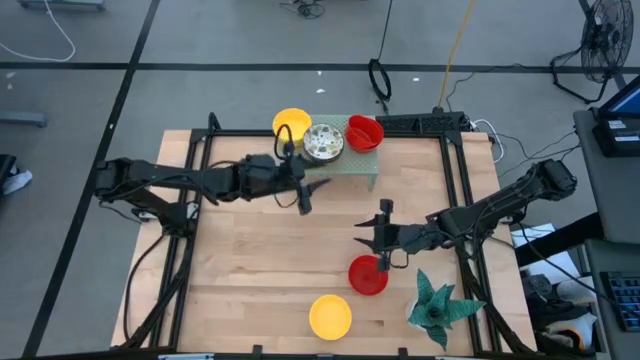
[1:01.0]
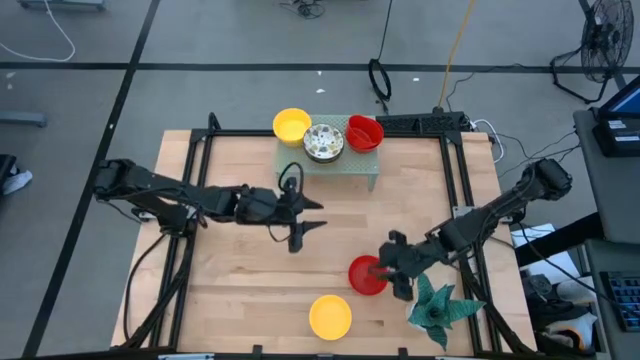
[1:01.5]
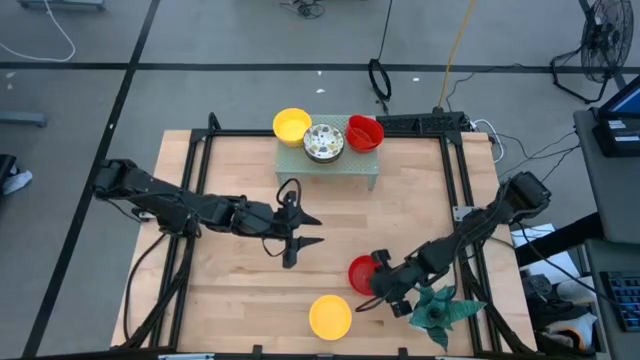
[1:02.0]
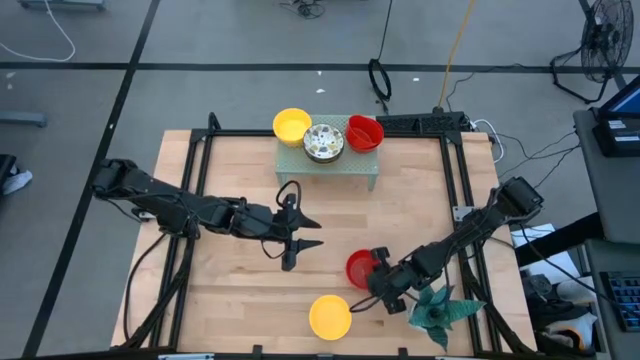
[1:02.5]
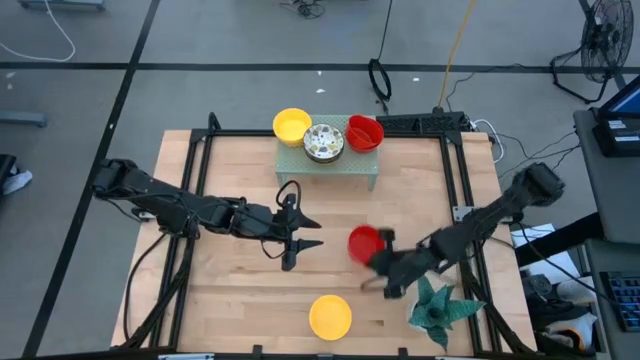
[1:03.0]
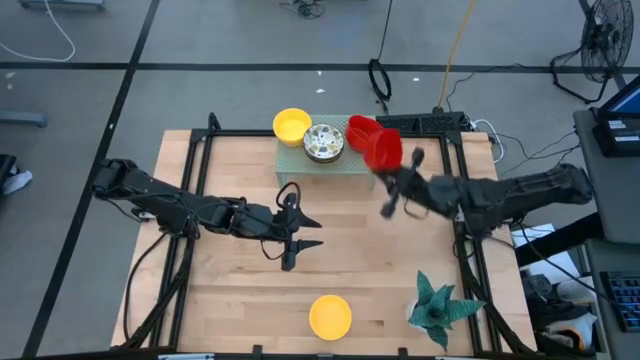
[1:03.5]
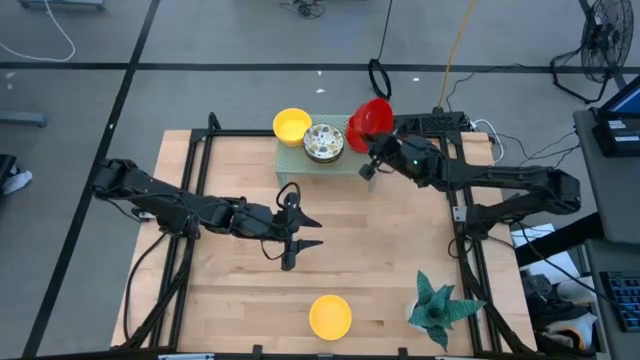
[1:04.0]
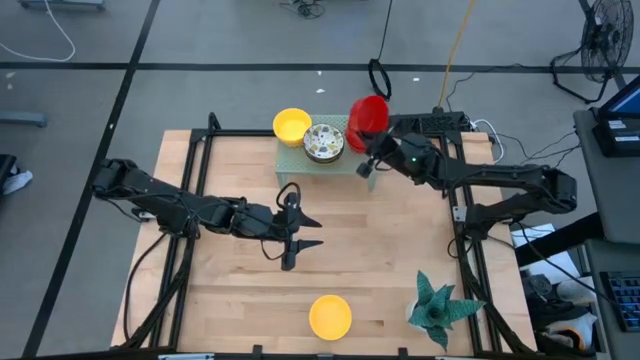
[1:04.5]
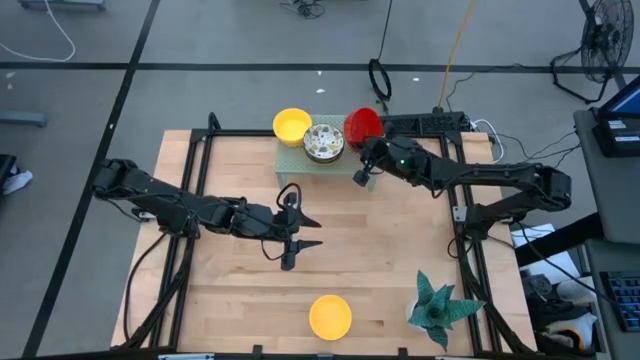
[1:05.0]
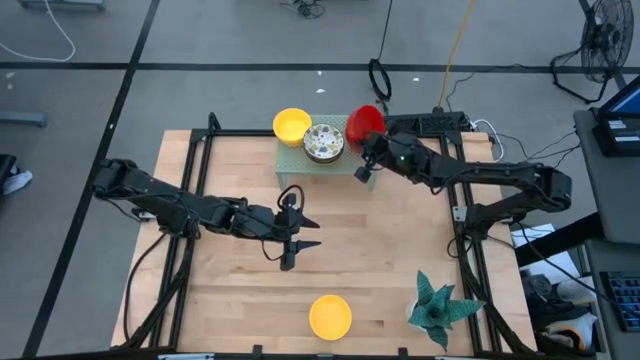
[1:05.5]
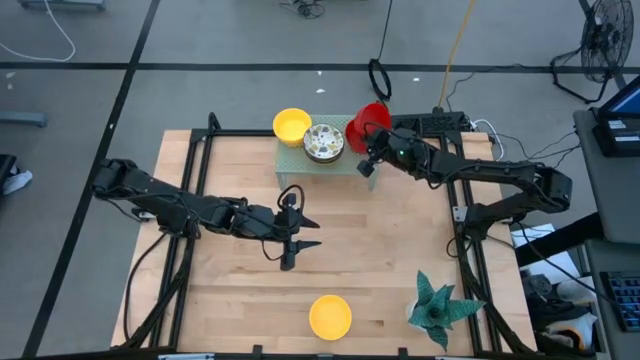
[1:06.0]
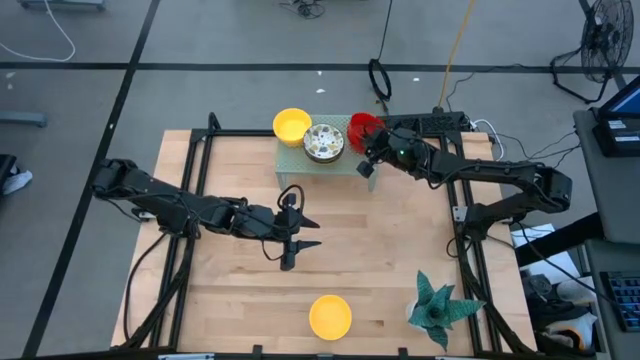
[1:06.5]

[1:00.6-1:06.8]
Task: Pick & Place Mini bowls
Stack the red bowl on top of the red bowl on the shelf

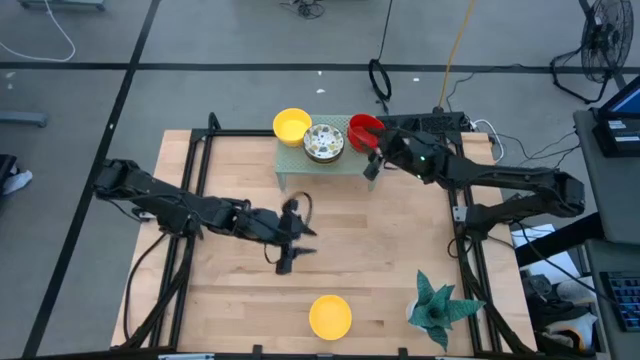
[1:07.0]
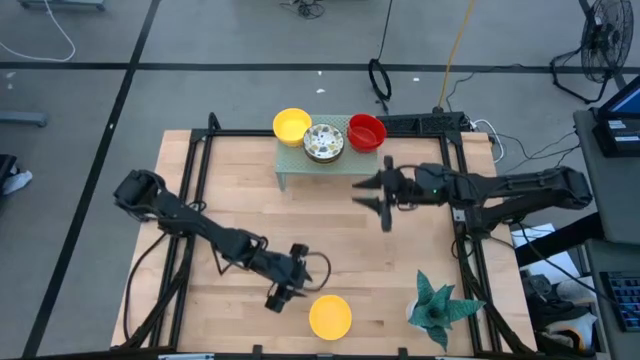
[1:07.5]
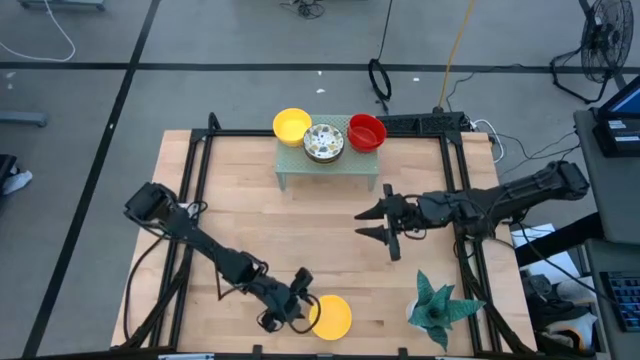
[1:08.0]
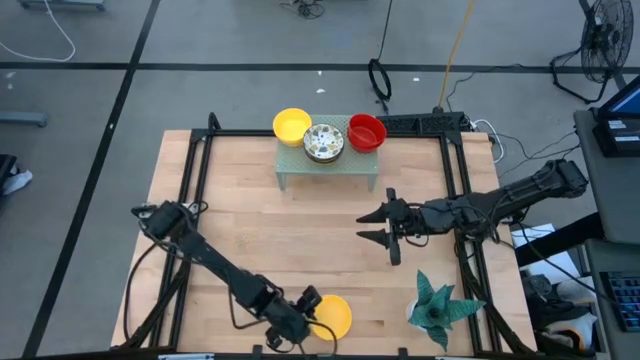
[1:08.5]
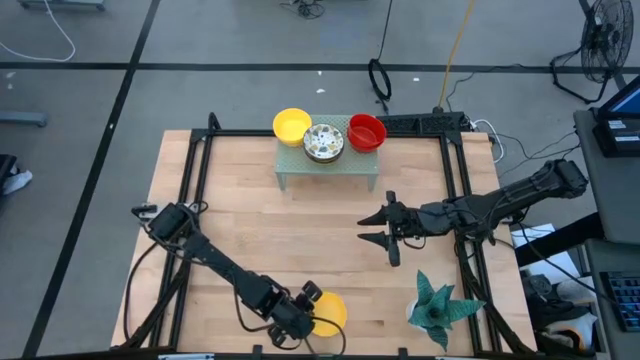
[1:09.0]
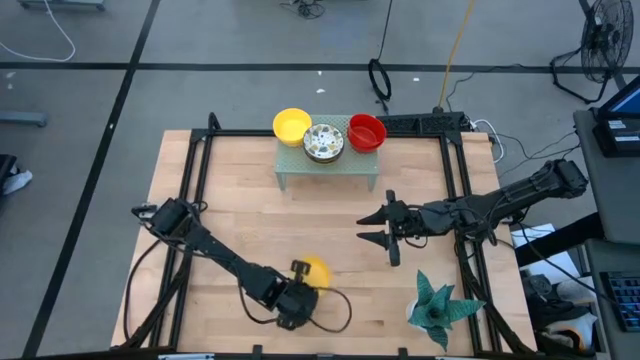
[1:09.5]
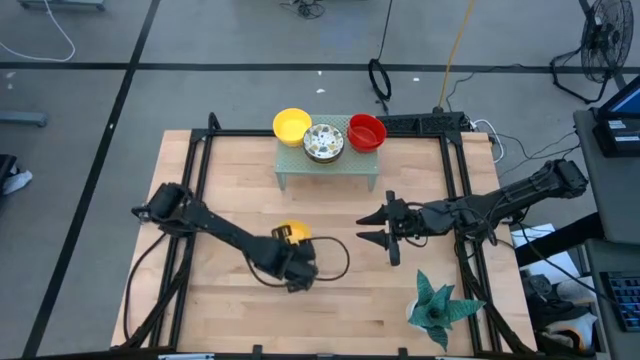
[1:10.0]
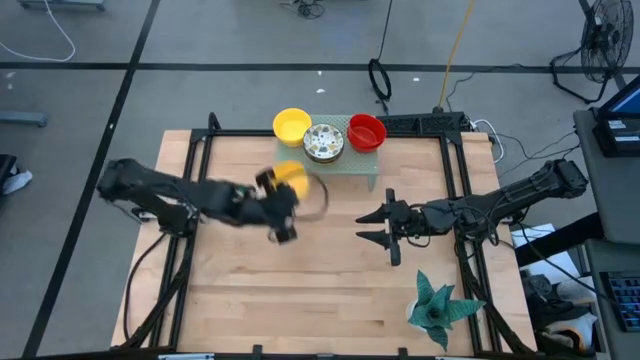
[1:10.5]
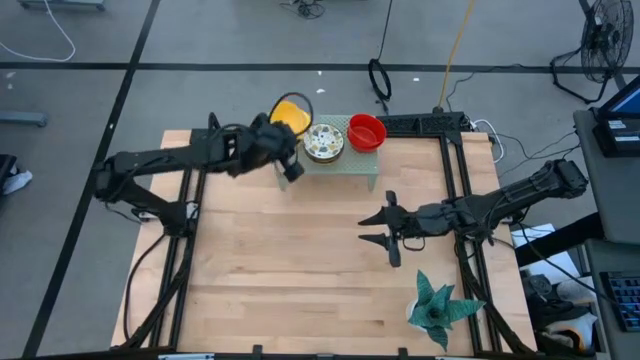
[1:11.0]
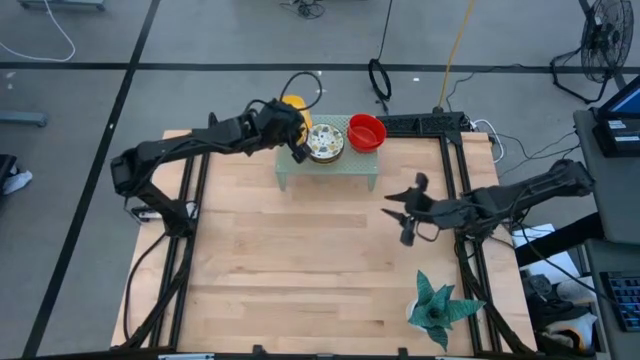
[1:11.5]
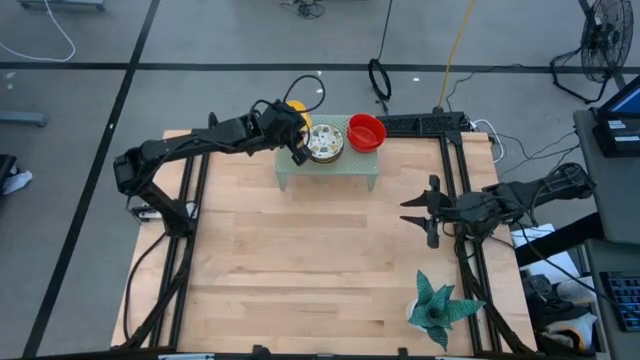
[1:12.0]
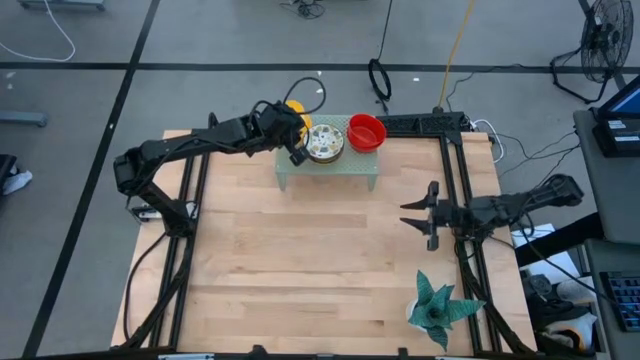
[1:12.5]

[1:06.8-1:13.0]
Stack the yellow bowl on top of the yellow bowl on the shelf

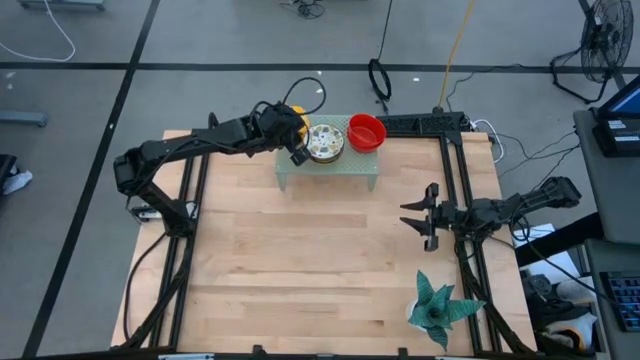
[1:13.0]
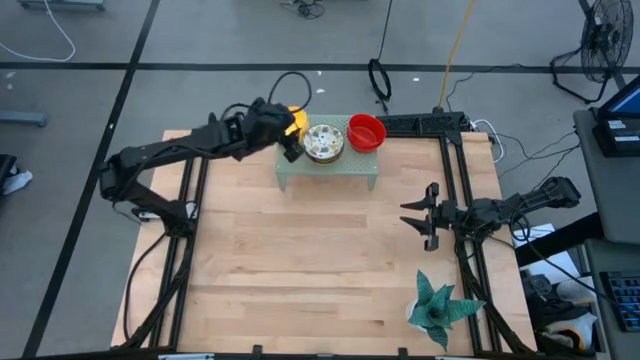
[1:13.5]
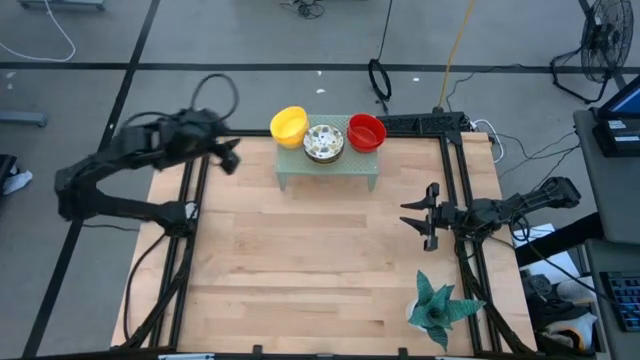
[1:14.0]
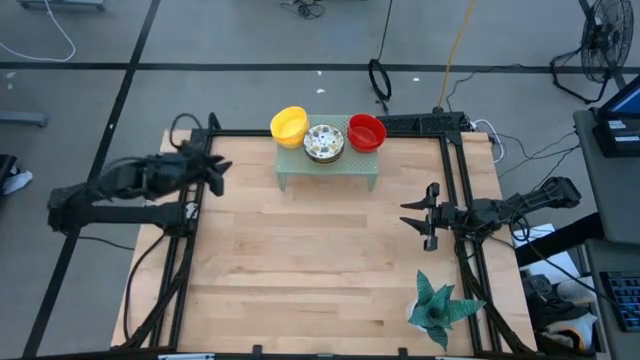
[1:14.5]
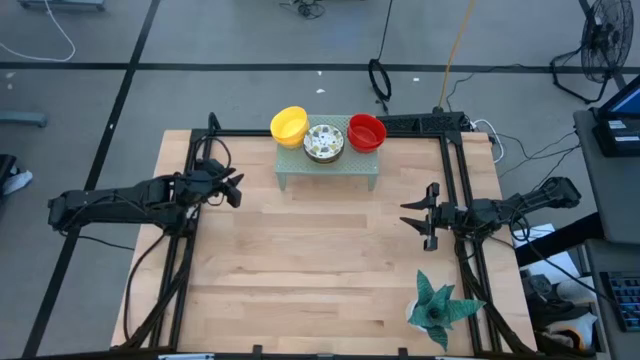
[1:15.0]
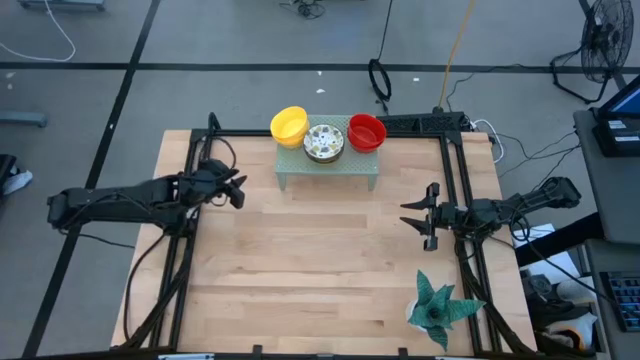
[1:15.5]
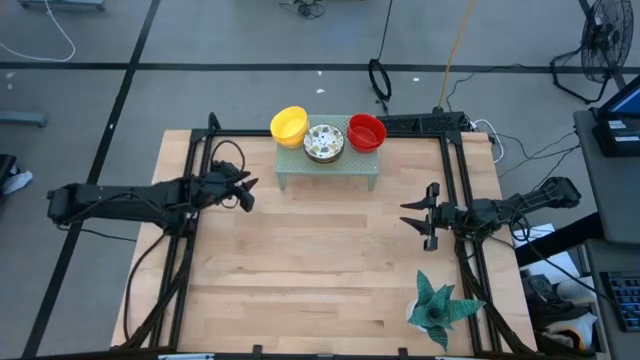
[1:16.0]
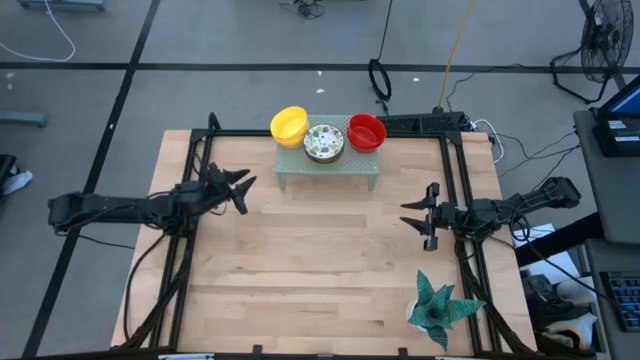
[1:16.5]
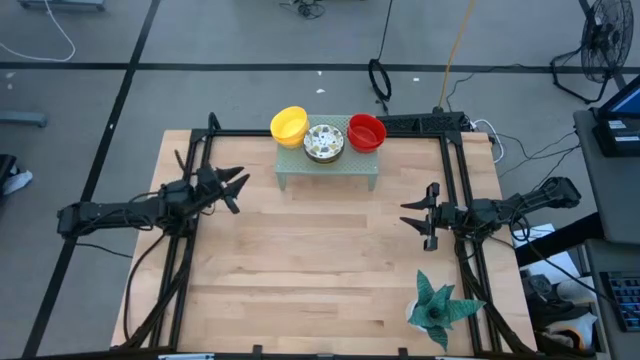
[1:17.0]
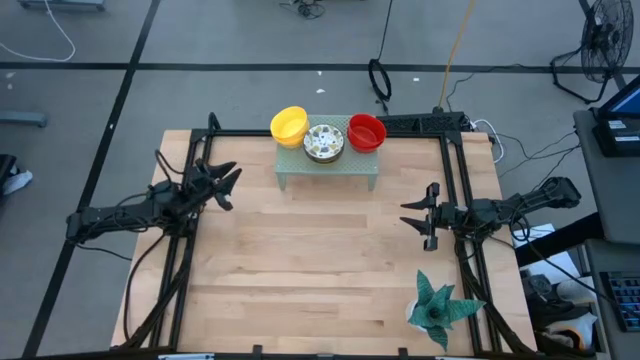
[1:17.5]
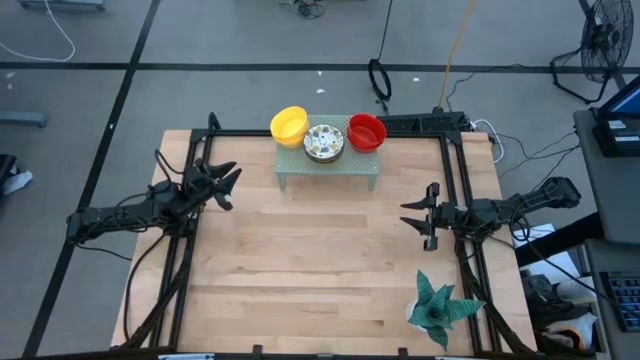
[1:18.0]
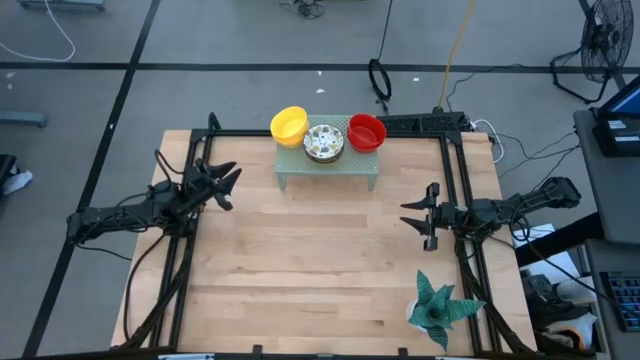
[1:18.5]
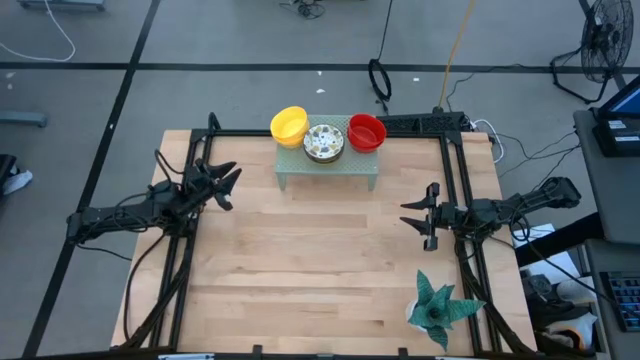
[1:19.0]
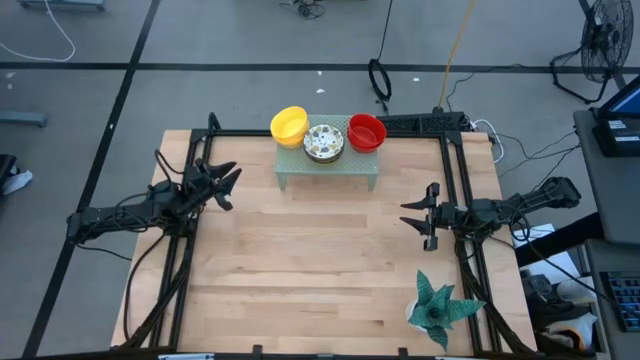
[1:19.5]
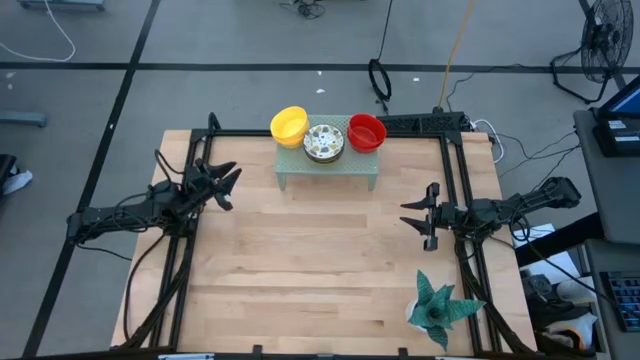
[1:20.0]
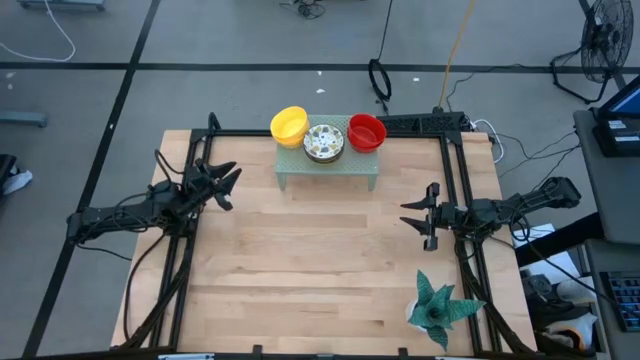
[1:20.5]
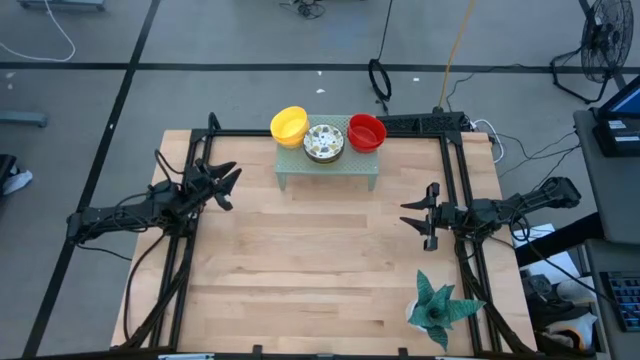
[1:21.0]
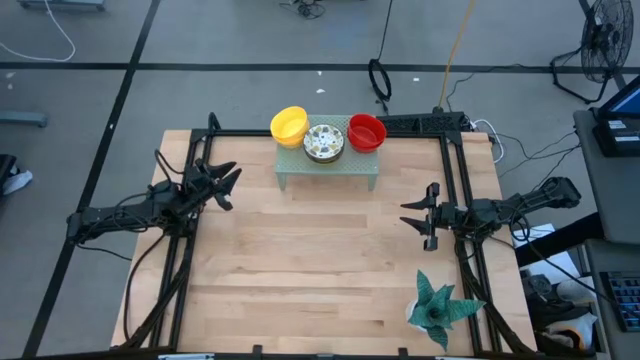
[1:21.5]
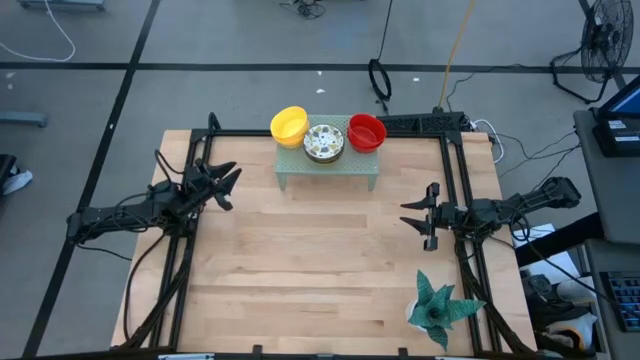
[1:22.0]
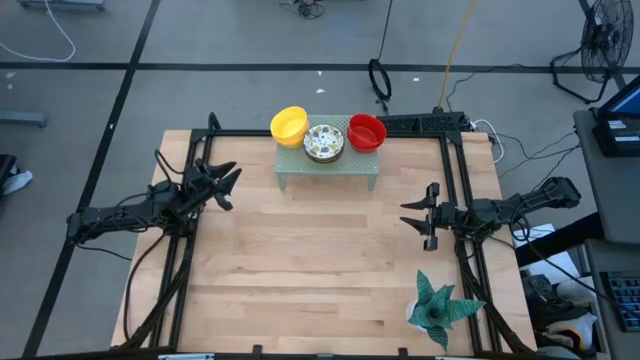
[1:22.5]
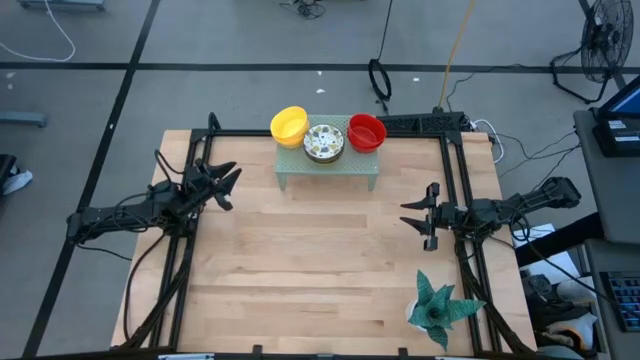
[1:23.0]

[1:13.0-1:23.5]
Return to Home Position
